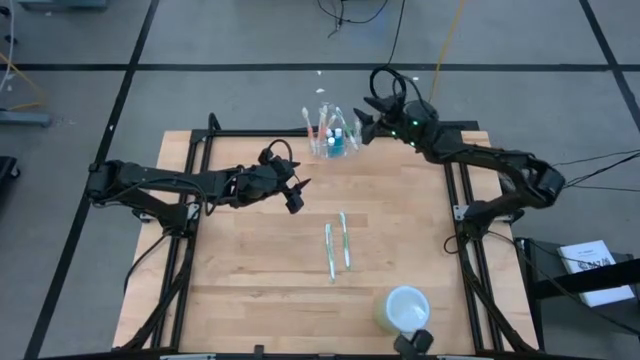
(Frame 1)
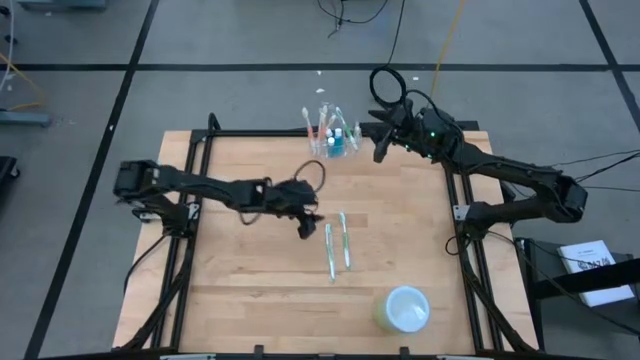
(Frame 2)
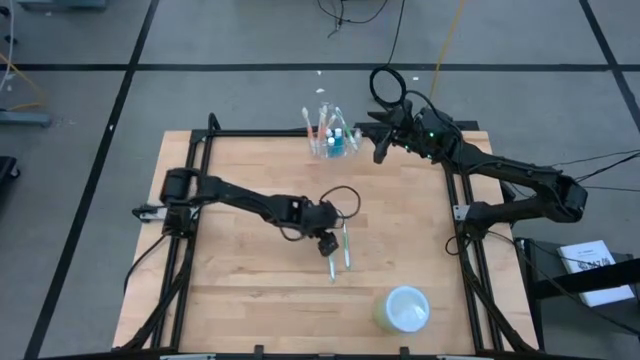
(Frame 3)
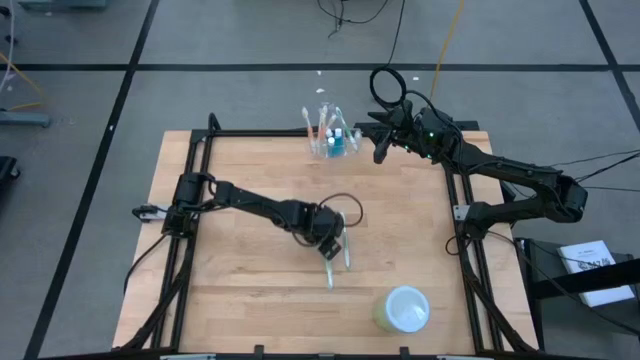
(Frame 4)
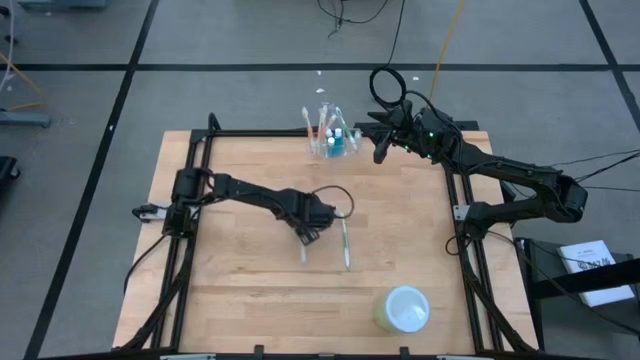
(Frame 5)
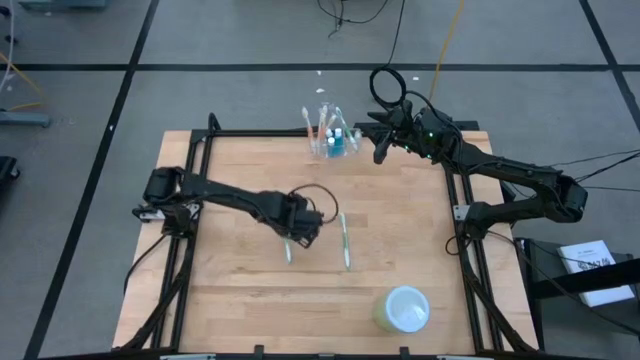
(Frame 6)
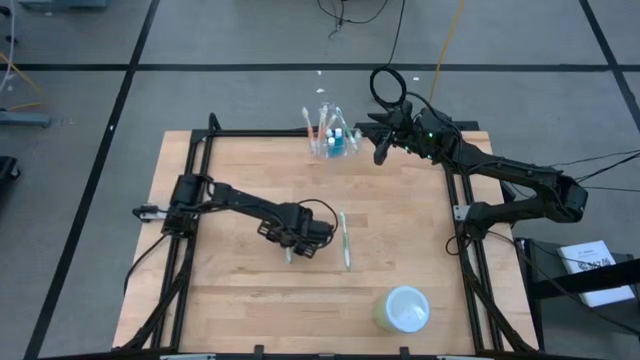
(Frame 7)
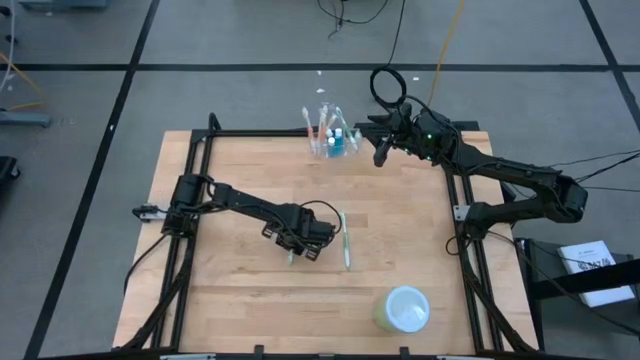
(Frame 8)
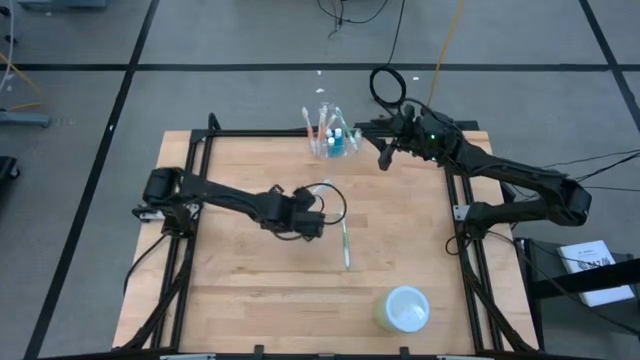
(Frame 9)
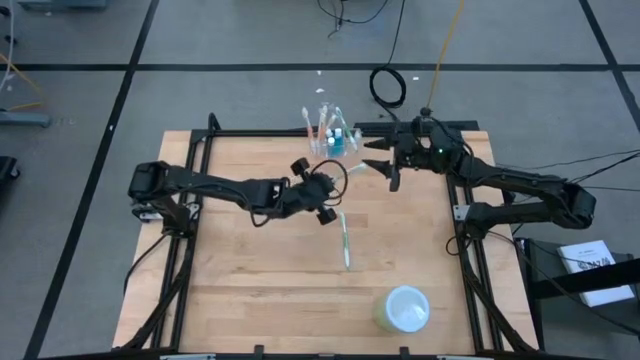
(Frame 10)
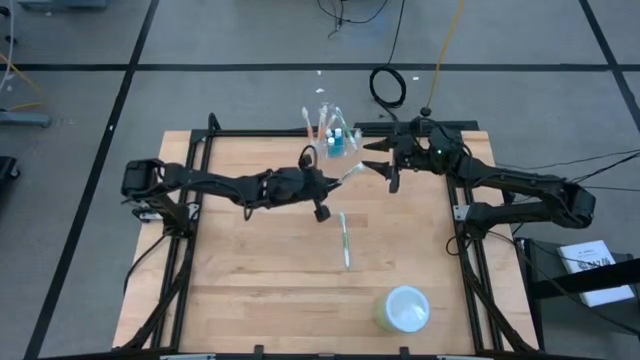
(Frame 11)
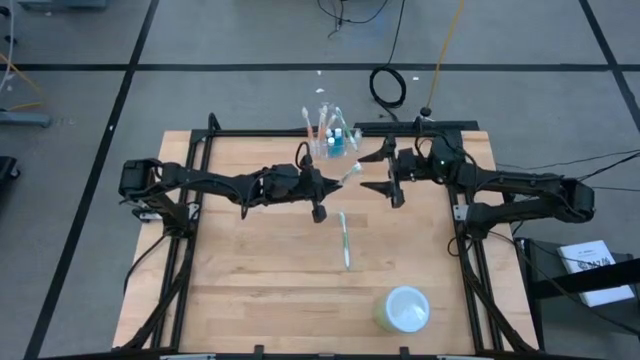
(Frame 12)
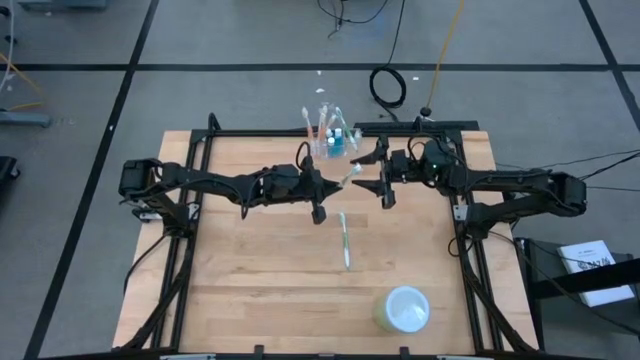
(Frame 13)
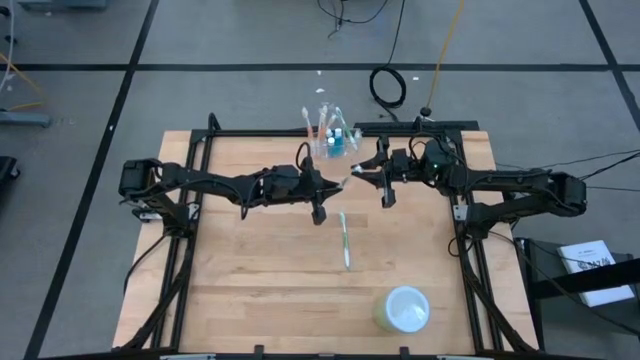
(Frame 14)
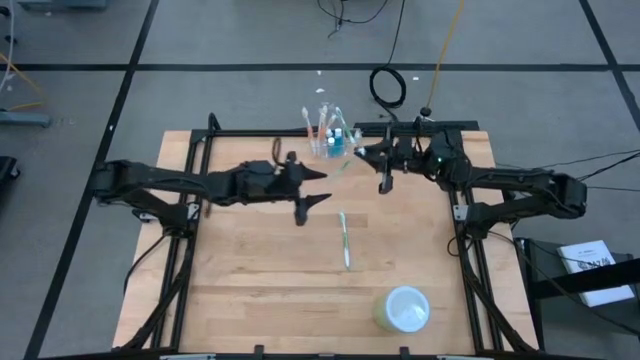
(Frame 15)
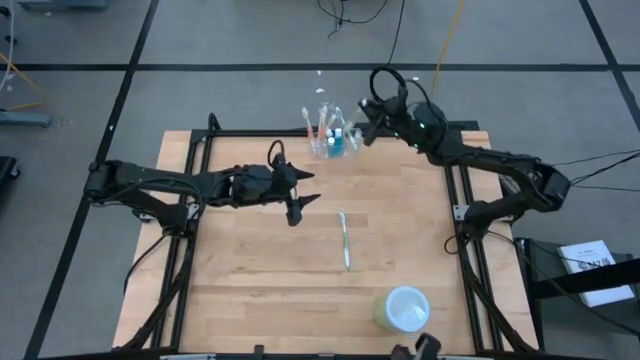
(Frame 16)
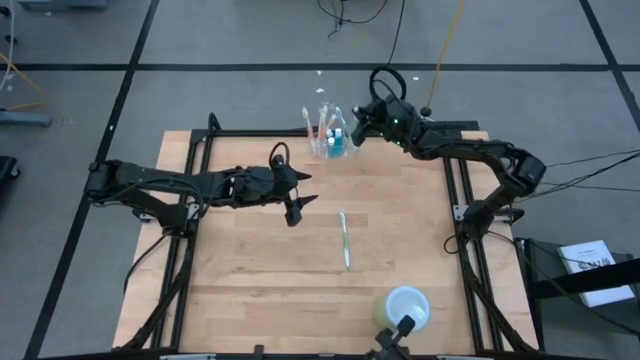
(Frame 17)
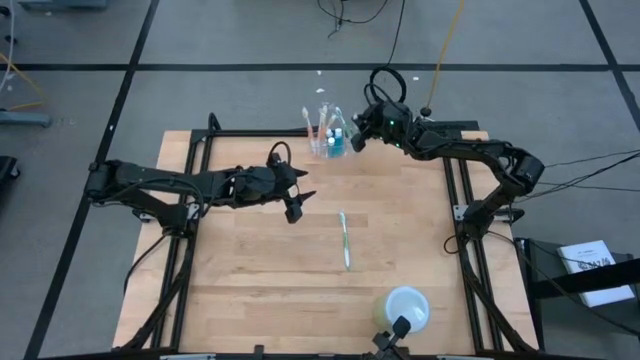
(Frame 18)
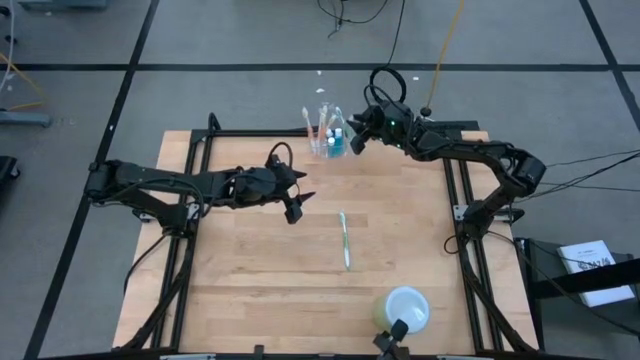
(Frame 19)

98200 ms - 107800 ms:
Task: Pick & Place toothbrushing station
Put the green toothbrush into the transparent organizer

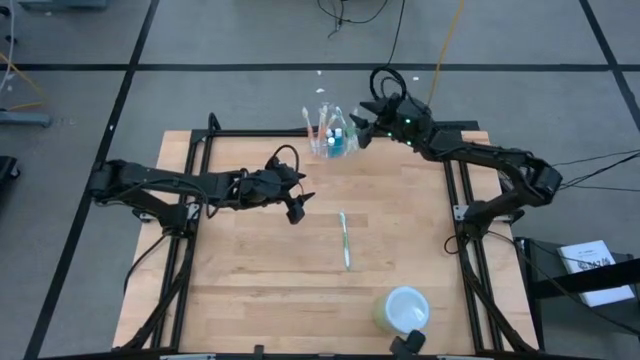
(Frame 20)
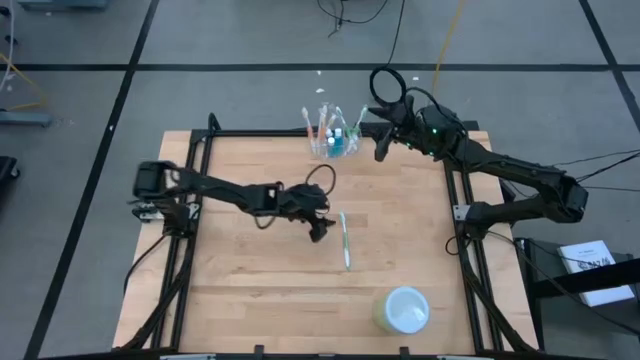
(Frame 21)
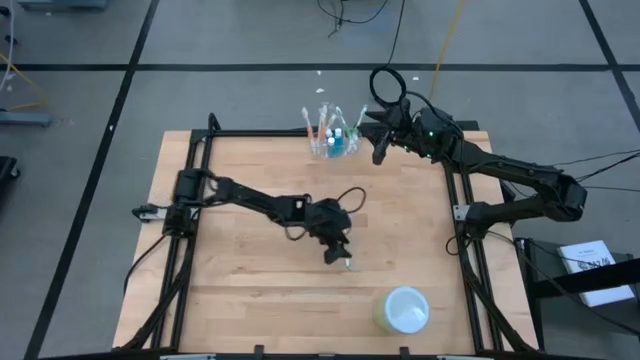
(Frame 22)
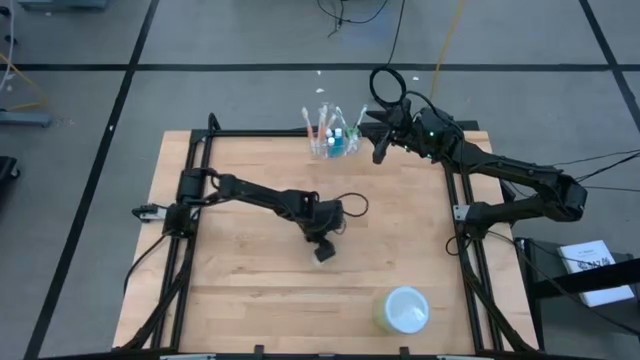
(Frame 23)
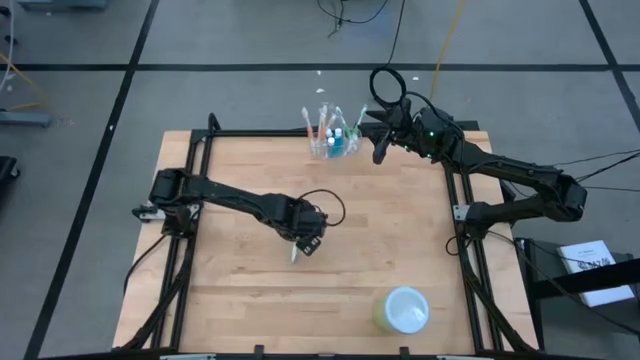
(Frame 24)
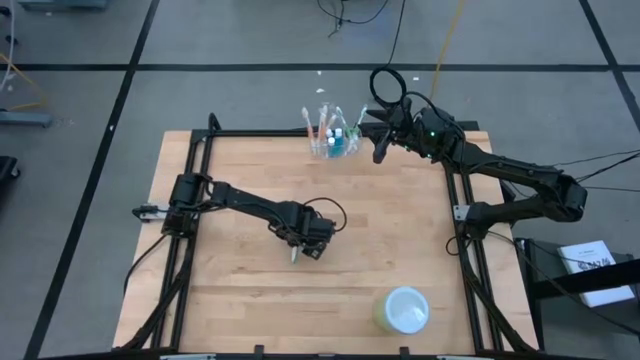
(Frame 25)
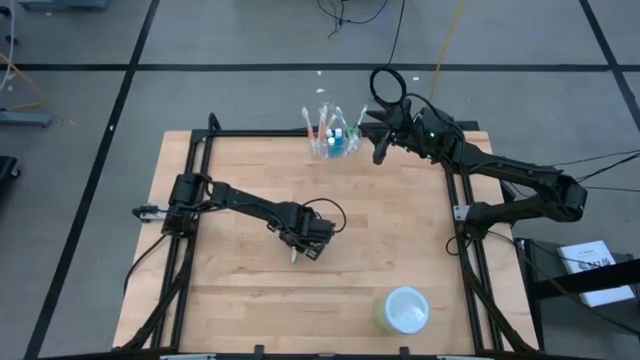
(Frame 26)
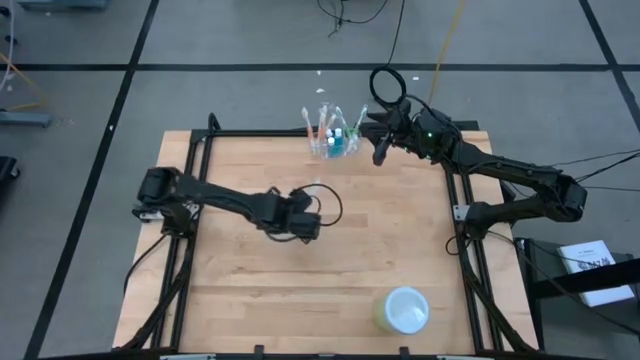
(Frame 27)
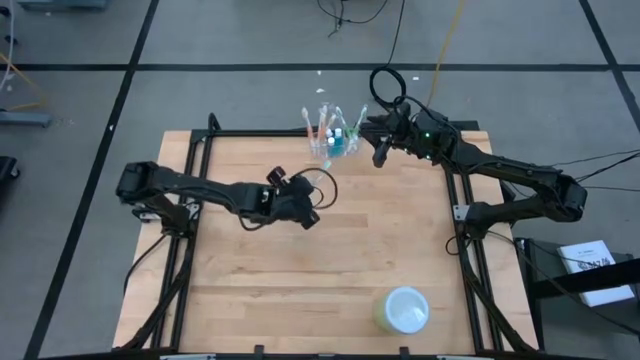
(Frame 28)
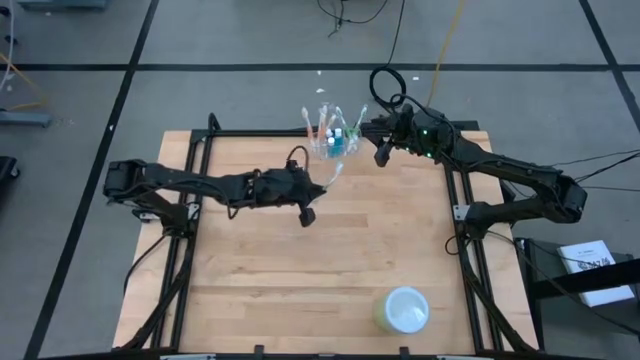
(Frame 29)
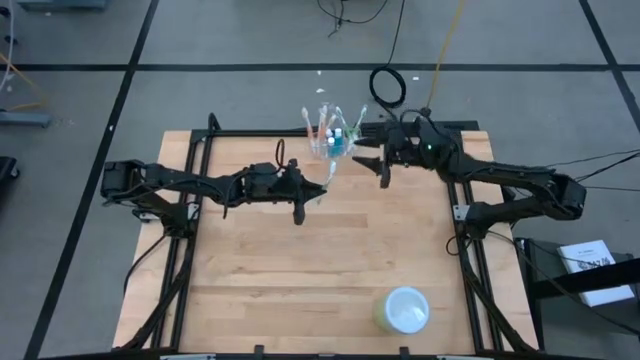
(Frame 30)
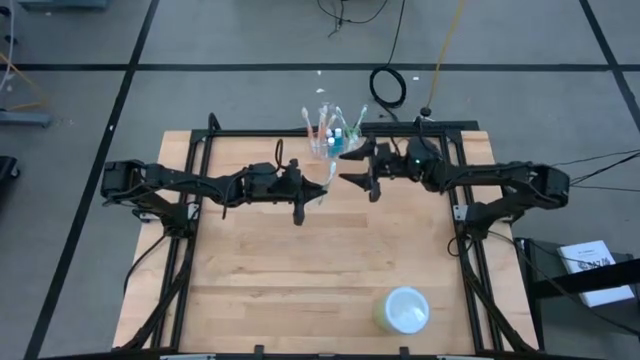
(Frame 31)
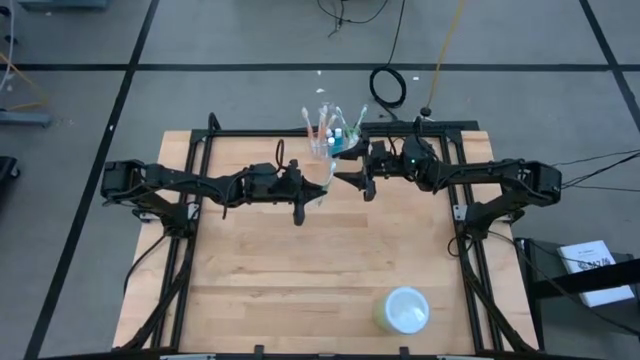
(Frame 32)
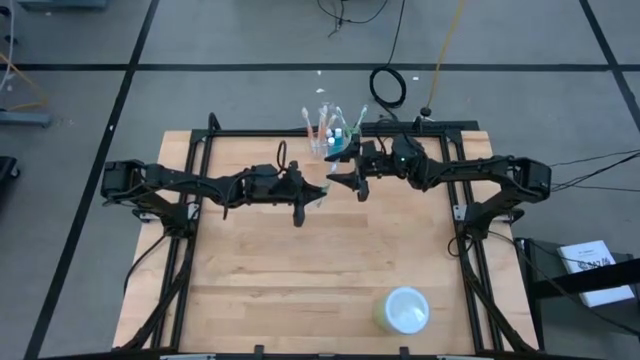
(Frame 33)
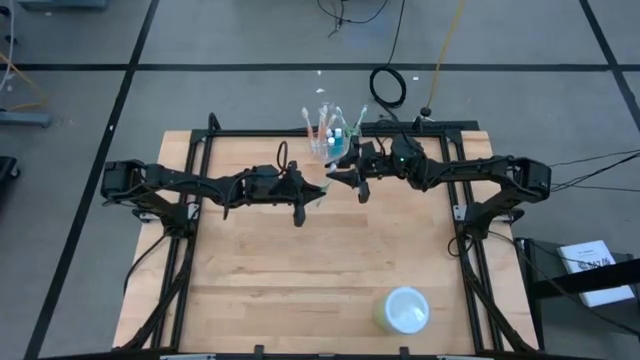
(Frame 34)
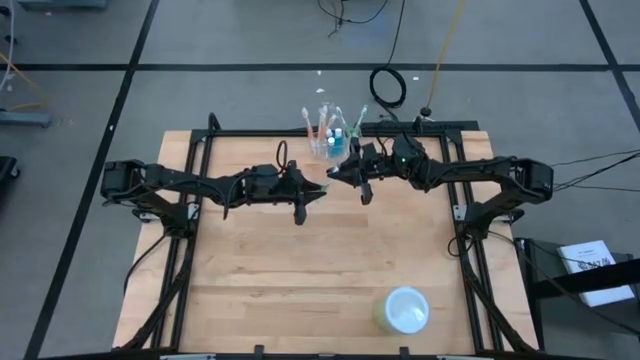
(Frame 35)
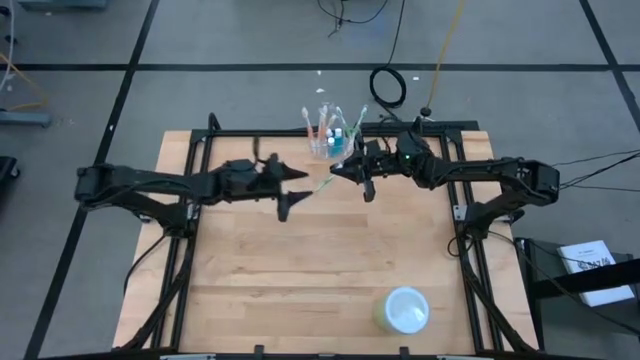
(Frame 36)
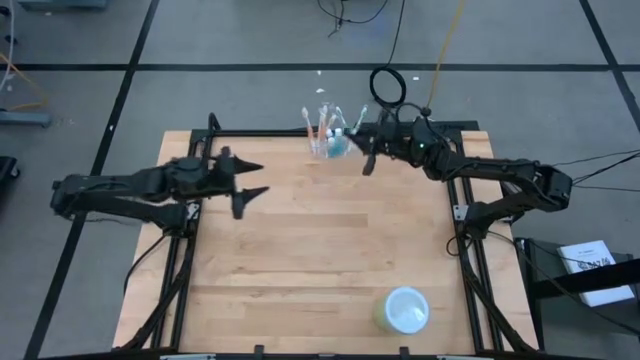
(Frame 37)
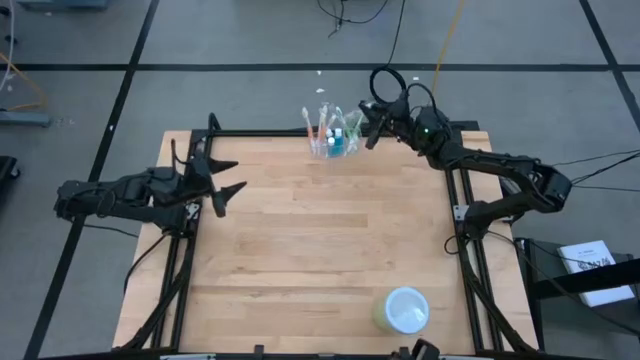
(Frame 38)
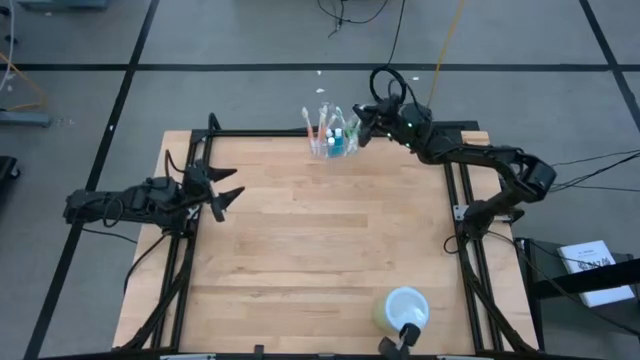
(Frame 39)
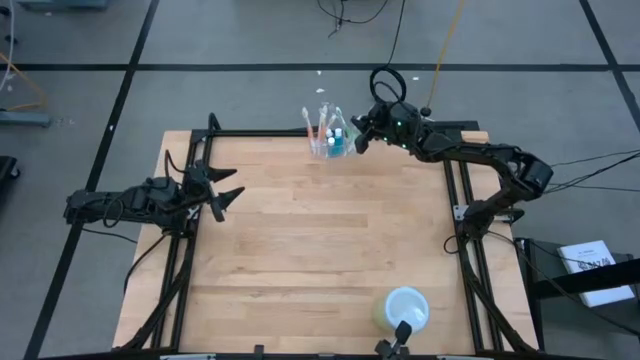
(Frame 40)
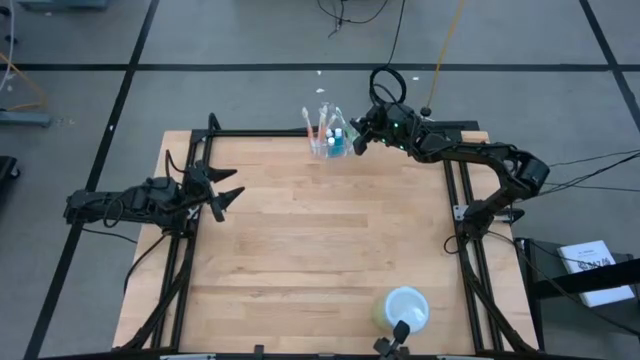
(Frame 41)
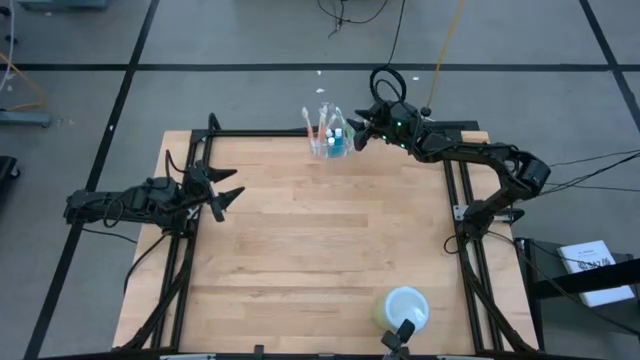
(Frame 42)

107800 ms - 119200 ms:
Put the green toothbrush into the transparent organizer
